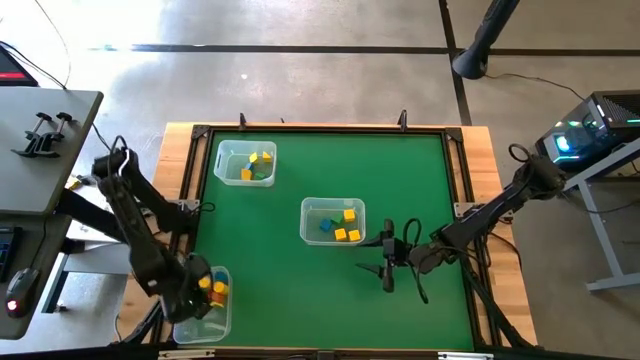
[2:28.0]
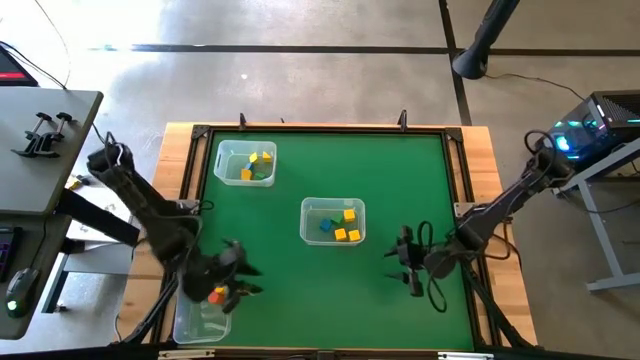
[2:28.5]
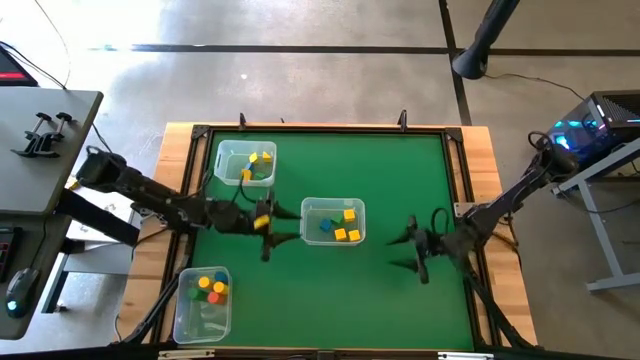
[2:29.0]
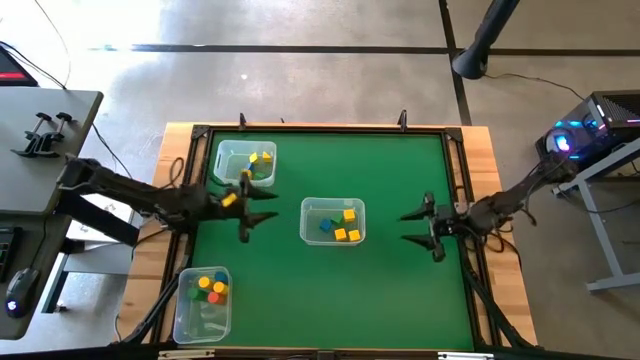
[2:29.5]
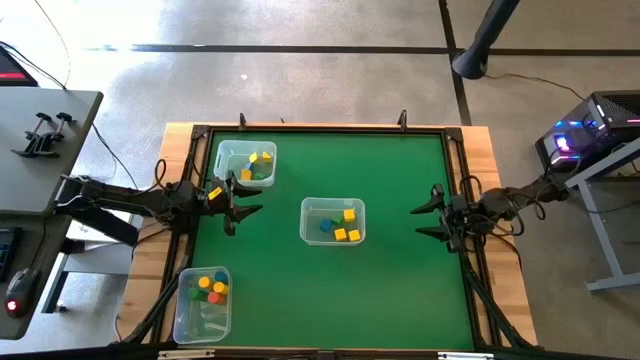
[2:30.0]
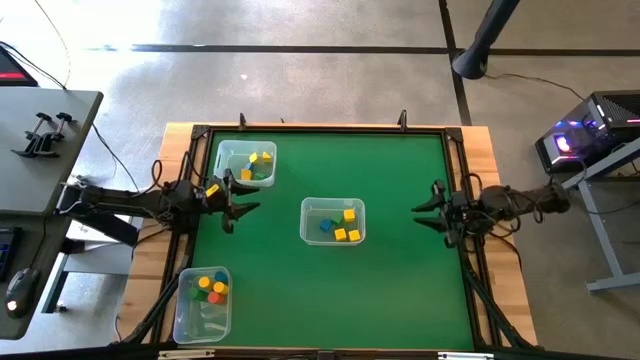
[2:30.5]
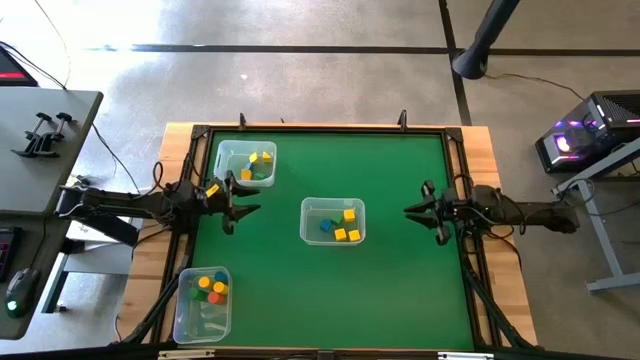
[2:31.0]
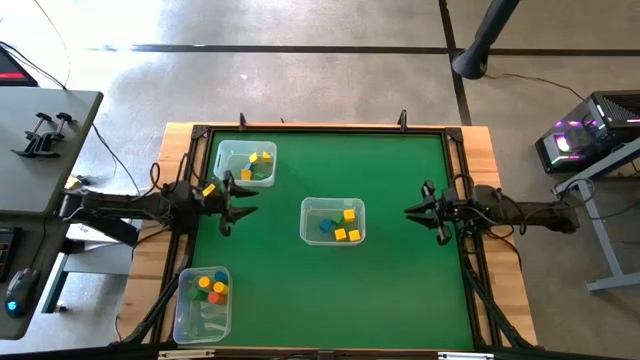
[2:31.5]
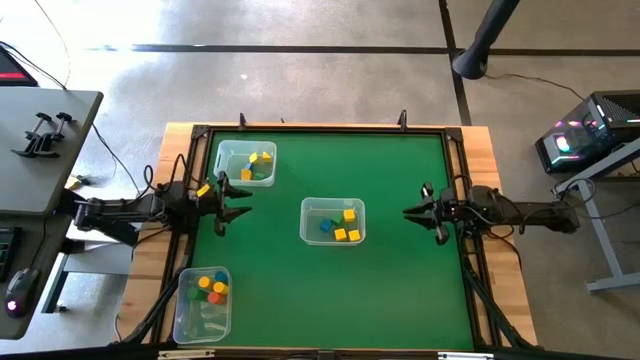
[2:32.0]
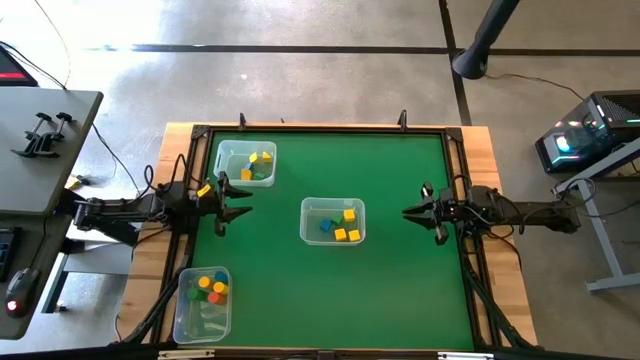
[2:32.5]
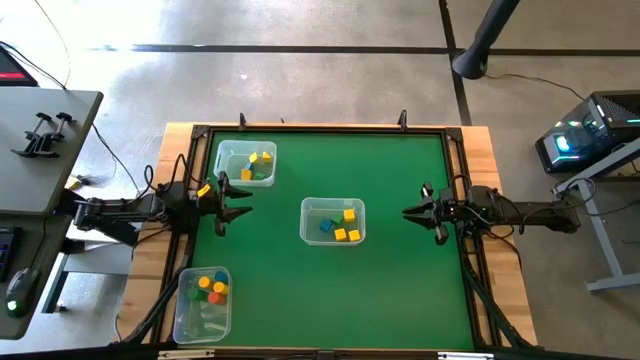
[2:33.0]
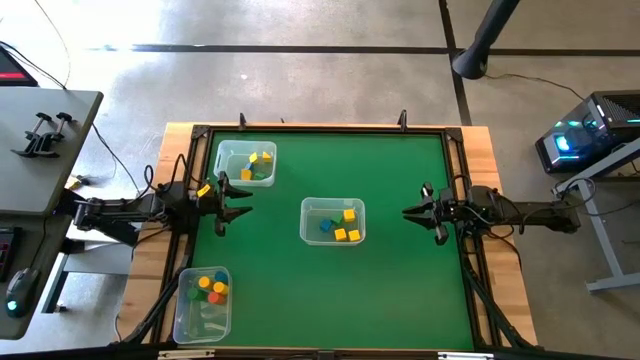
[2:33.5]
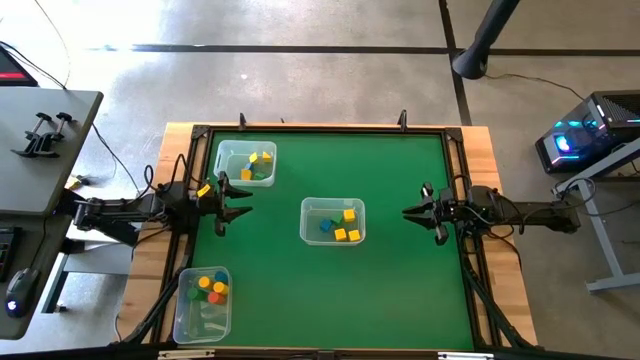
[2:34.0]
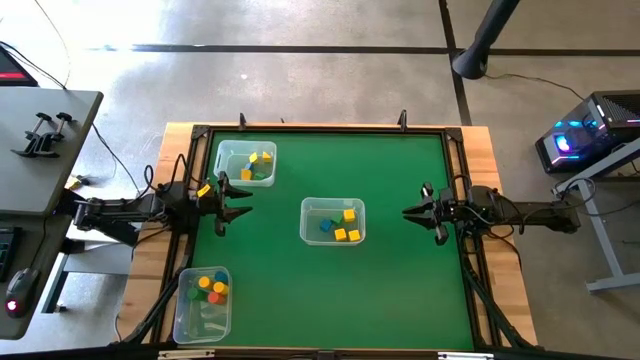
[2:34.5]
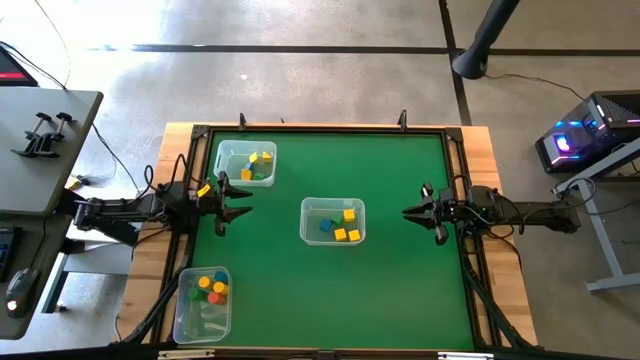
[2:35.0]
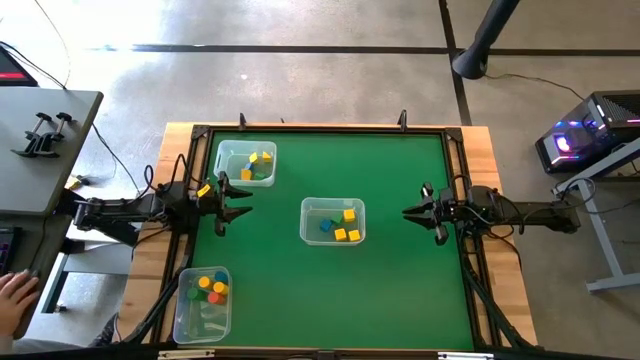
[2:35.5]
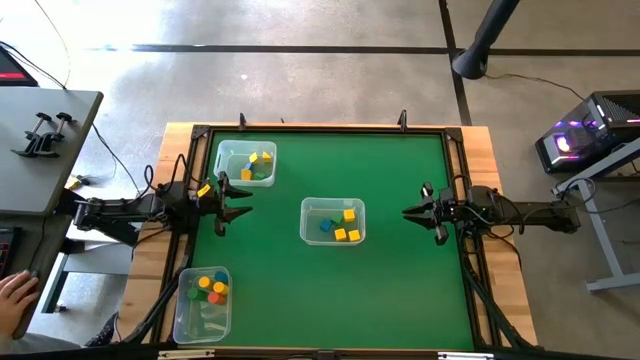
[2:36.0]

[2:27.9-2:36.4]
Task: Sort blocks by size
Return to Home Position

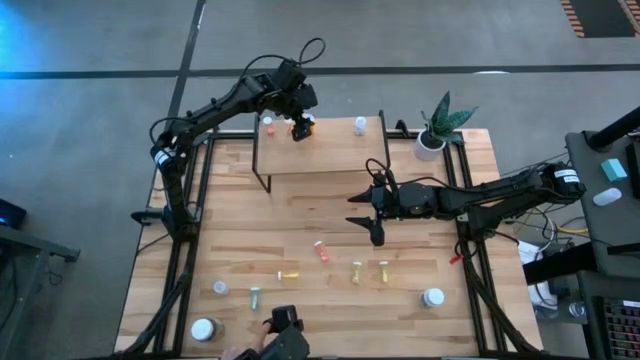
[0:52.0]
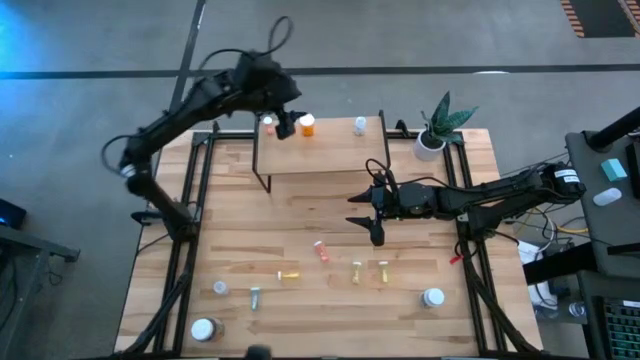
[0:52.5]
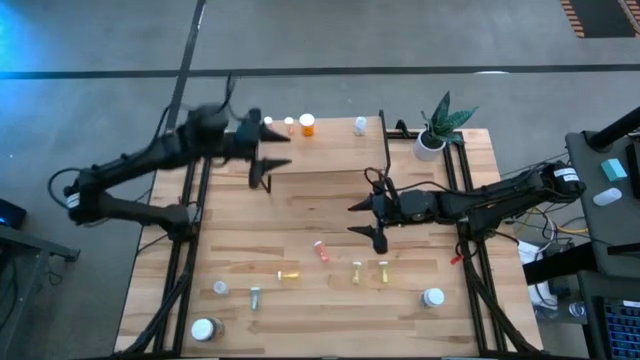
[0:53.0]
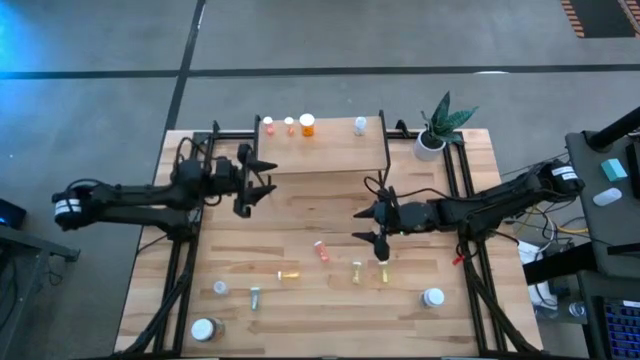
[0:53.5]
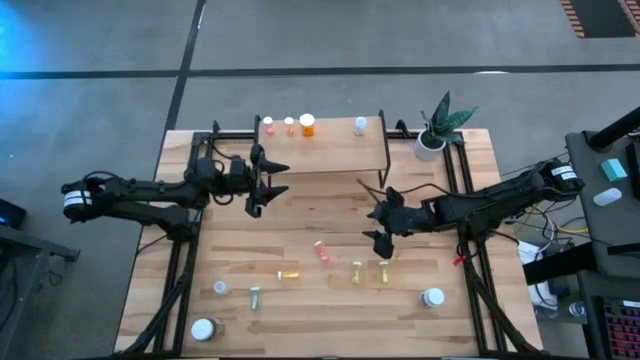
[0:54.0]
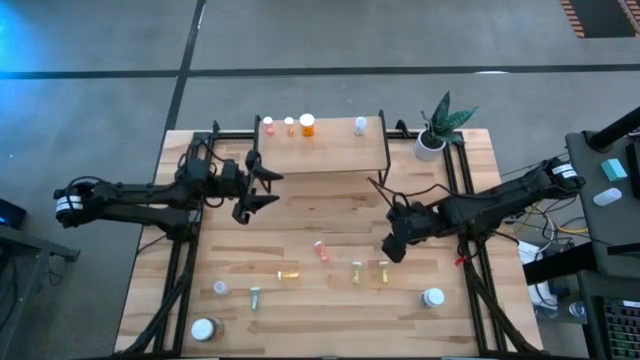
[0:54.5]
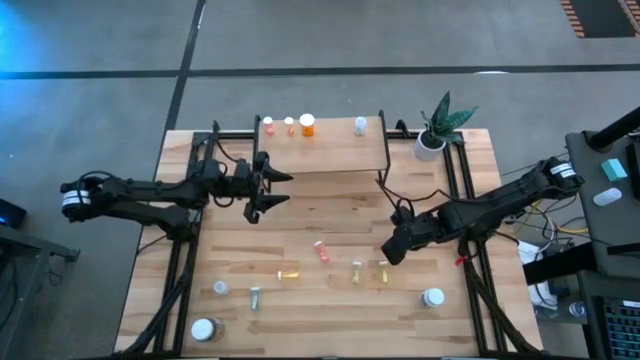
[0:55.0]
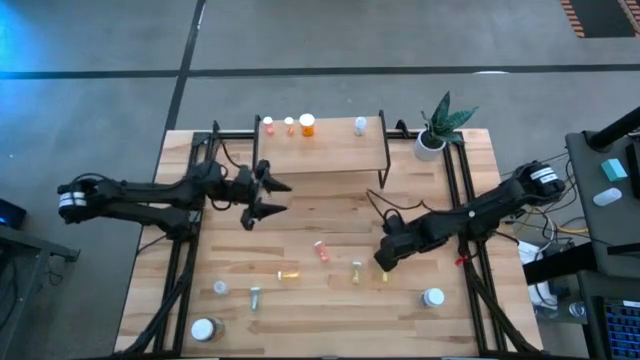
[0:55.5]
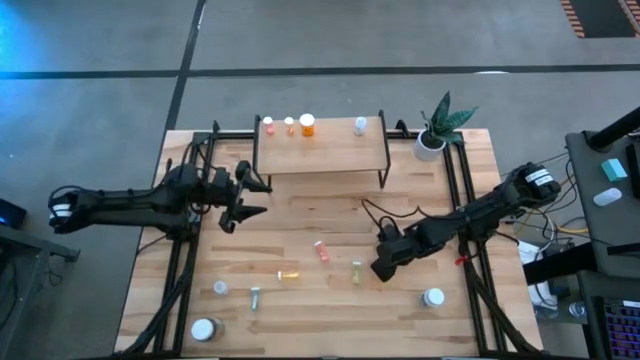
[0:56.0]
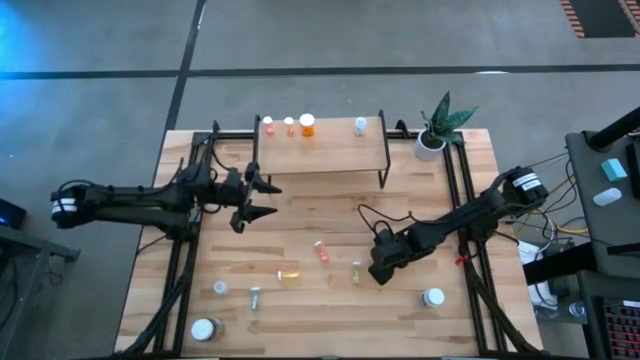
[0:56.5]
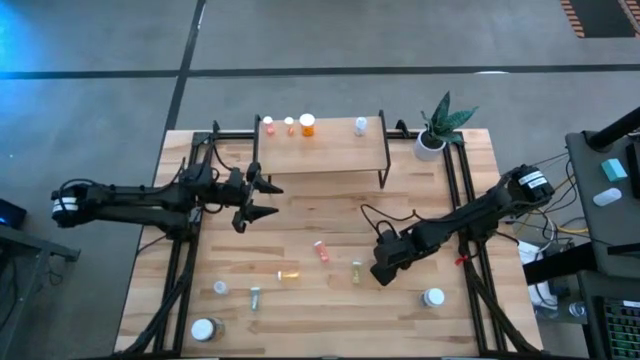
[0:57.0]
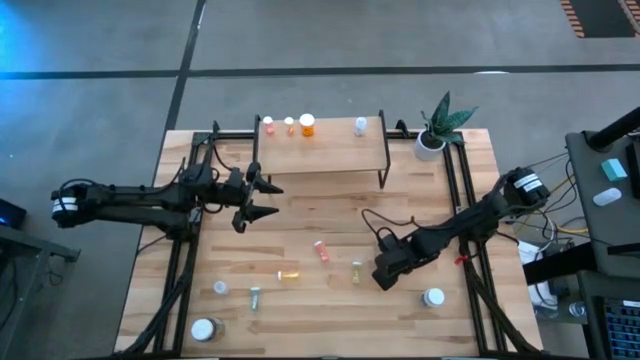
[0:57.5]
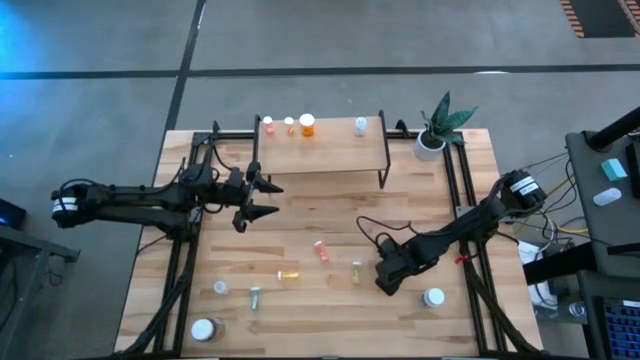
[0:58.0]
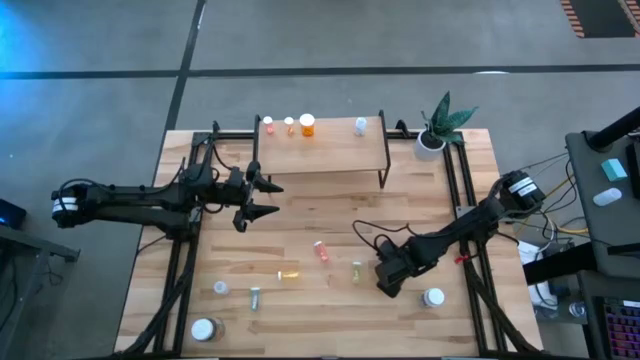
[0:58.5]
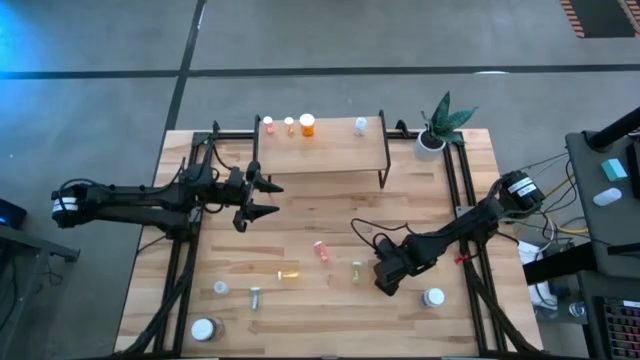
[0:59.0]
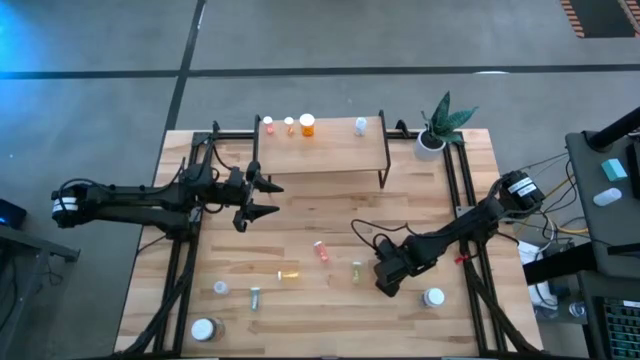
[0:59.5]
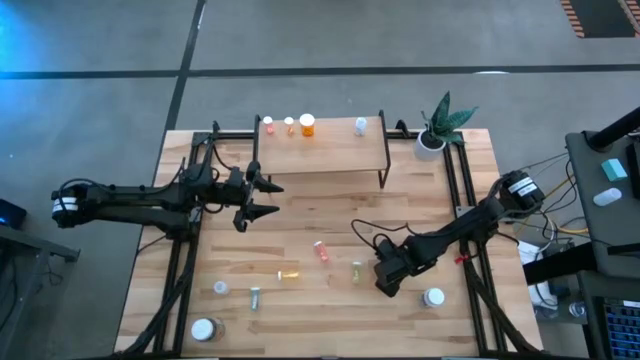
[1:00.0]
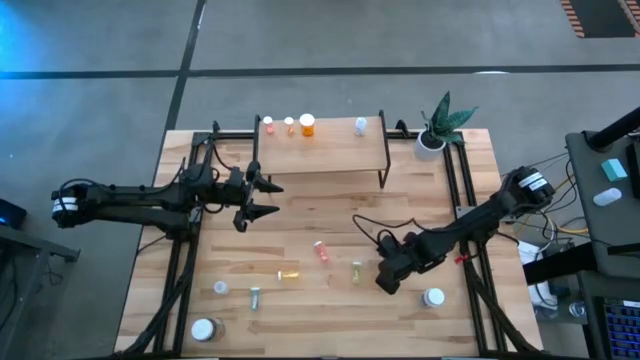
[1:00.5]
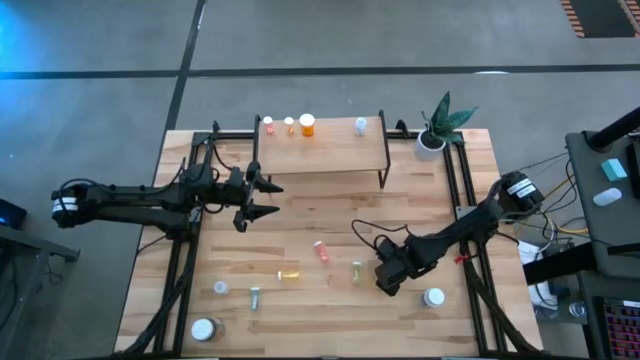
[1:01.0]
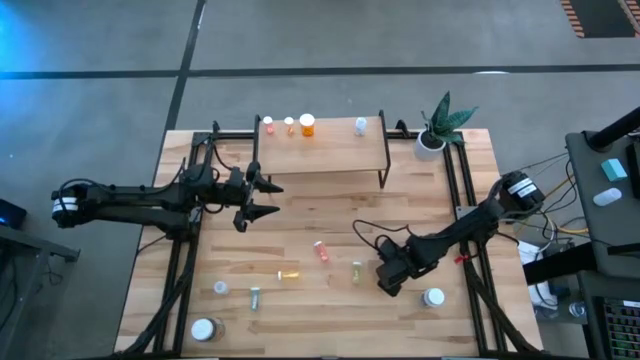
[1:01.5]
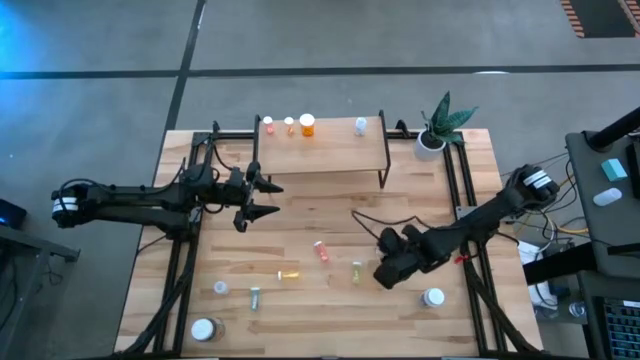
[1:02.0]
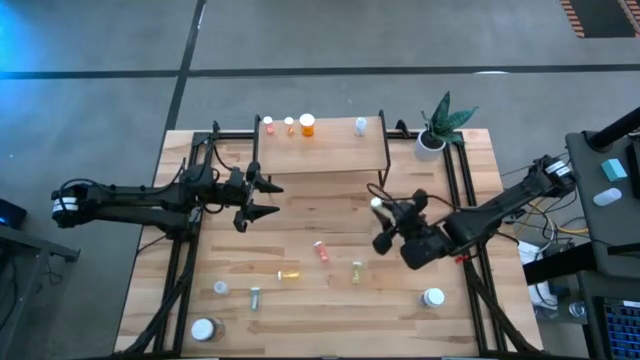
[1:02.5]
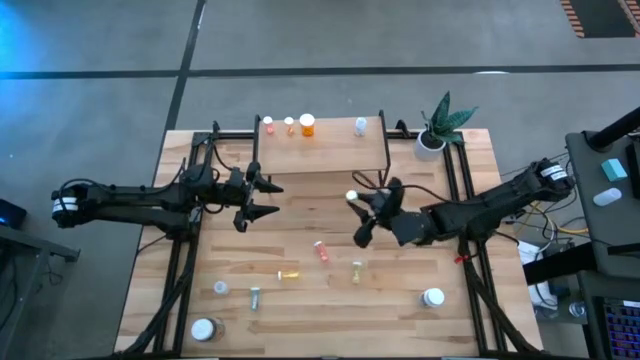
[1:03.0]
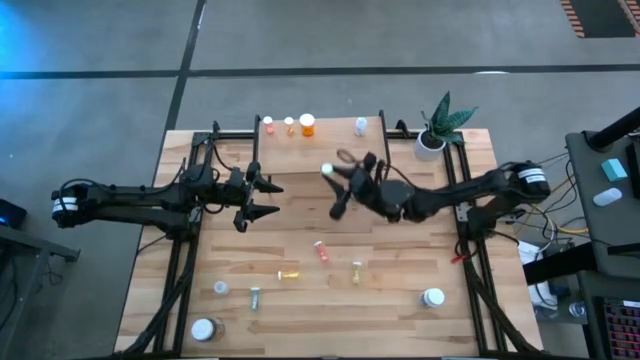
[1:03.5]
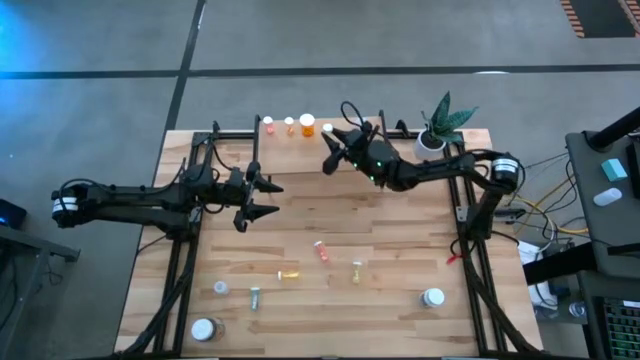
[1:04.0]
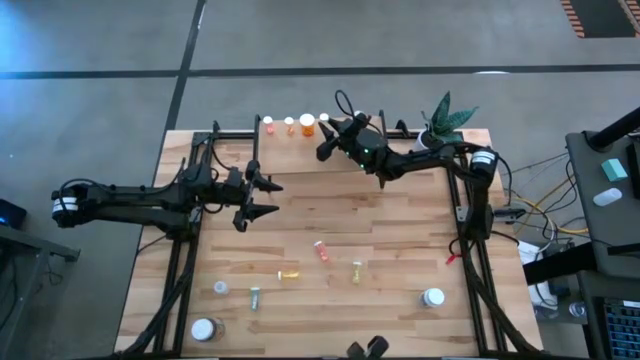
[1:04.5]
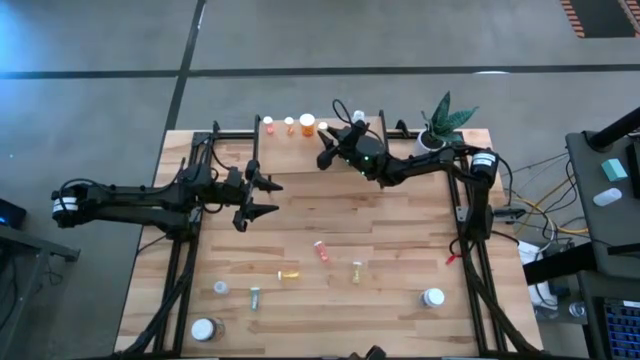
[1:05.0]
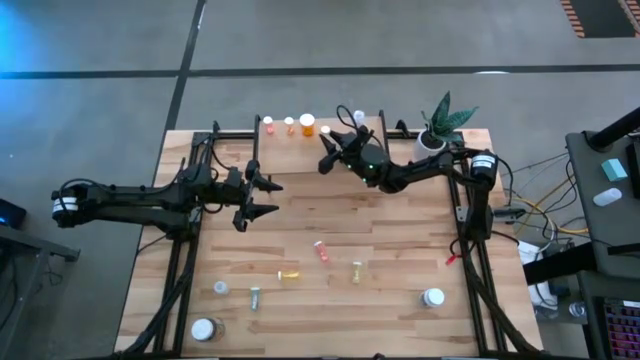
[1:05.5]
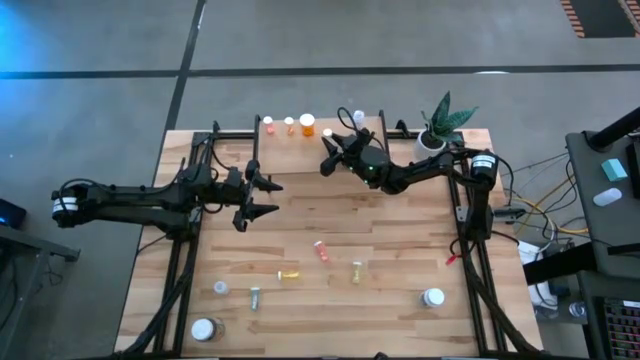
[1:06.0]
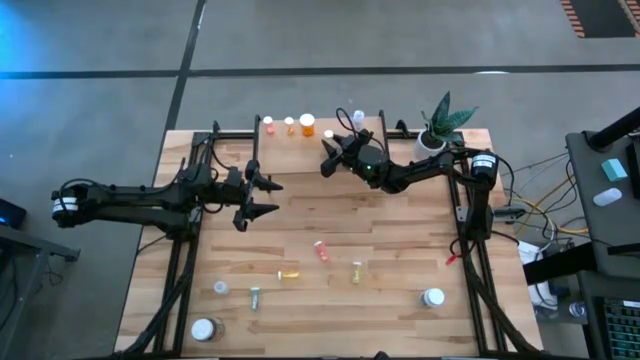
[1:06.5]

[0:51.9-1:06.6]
Task: Pick and place medicine bottles onto shelf by color
Put the right yellow pill bottle on the shelf
